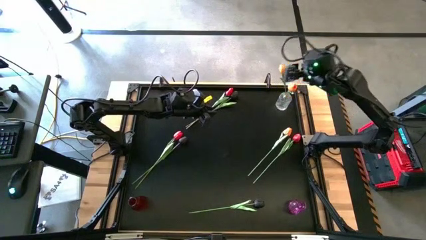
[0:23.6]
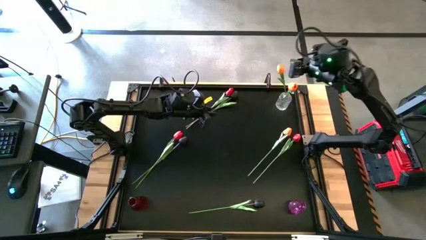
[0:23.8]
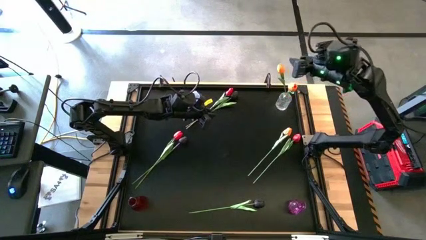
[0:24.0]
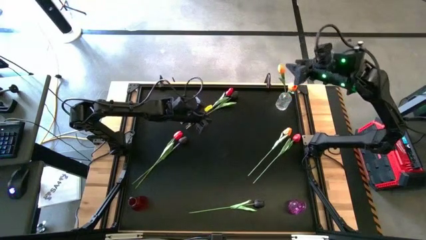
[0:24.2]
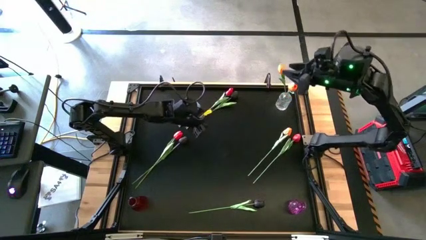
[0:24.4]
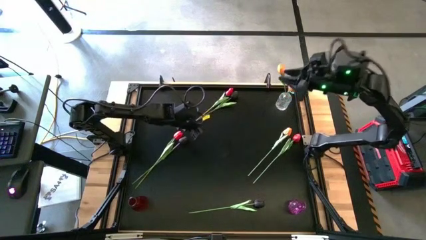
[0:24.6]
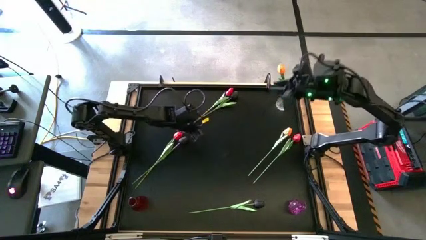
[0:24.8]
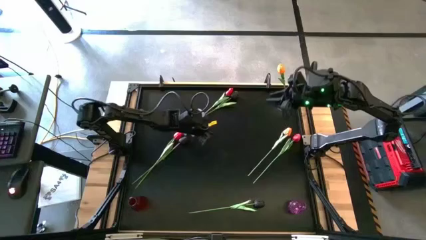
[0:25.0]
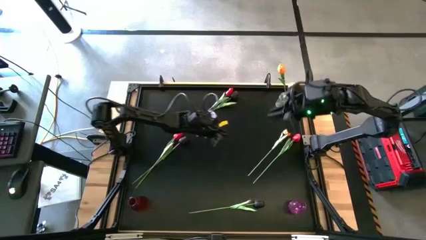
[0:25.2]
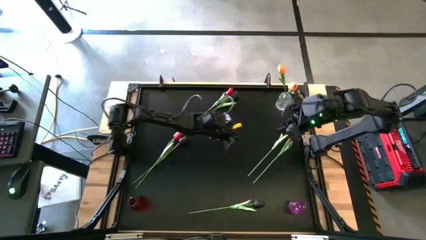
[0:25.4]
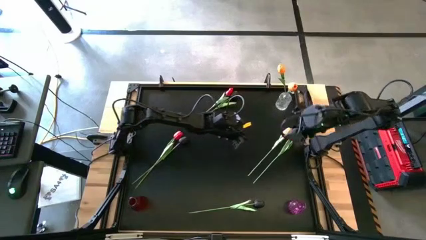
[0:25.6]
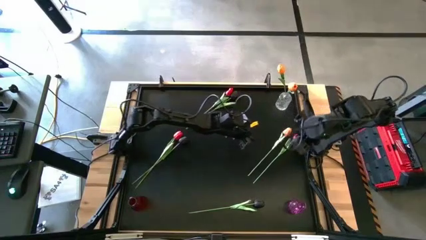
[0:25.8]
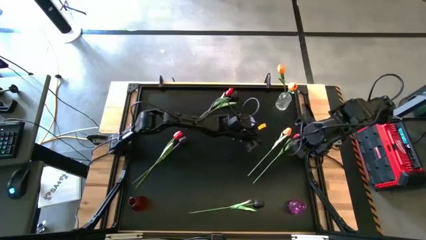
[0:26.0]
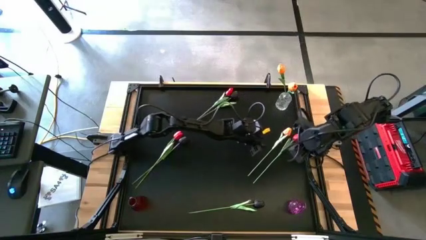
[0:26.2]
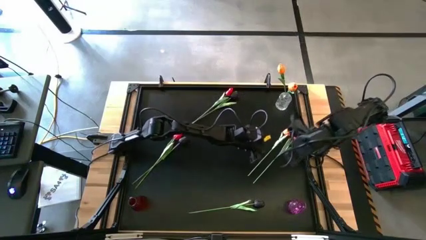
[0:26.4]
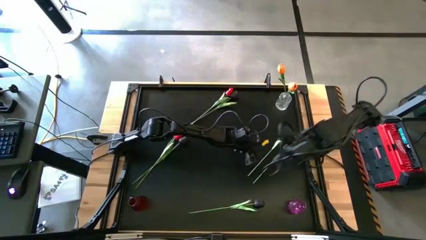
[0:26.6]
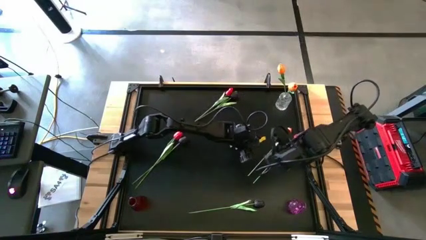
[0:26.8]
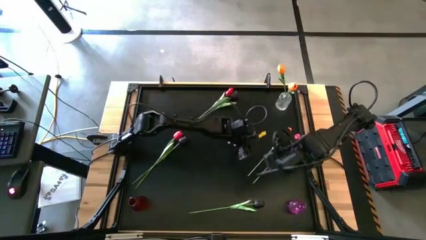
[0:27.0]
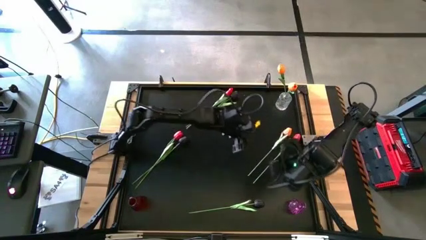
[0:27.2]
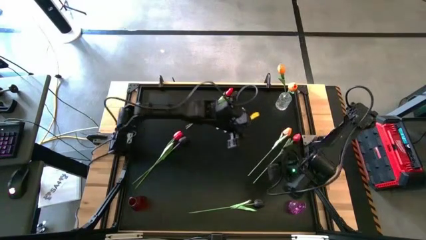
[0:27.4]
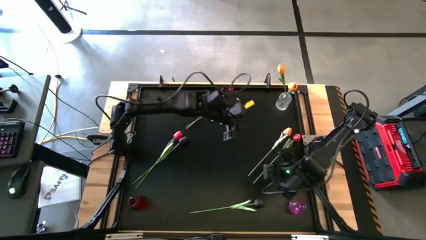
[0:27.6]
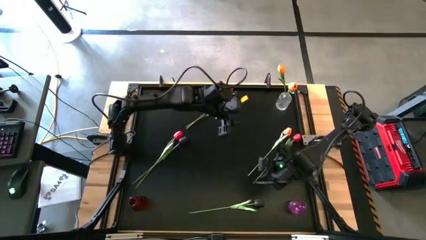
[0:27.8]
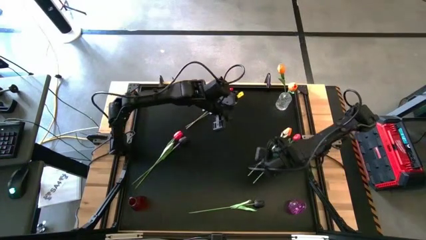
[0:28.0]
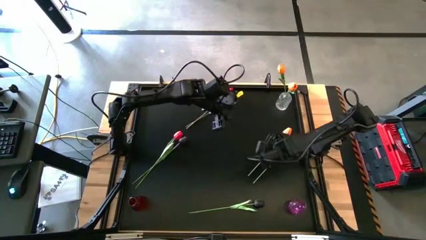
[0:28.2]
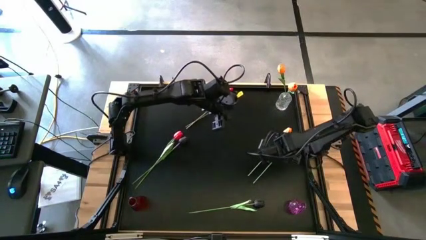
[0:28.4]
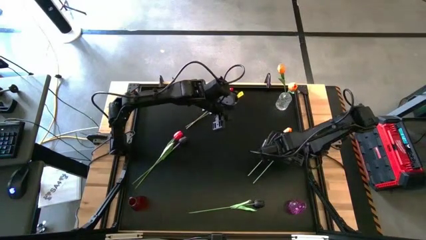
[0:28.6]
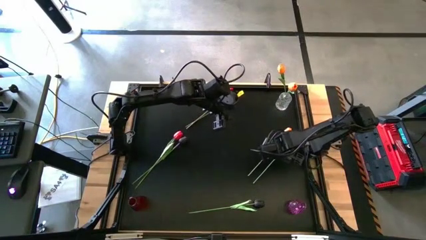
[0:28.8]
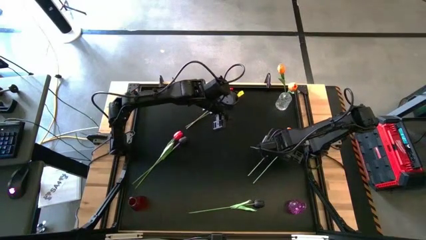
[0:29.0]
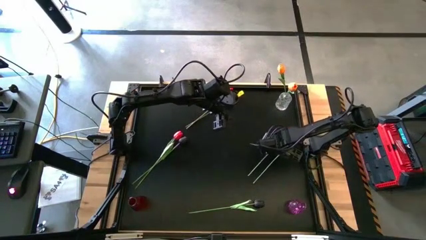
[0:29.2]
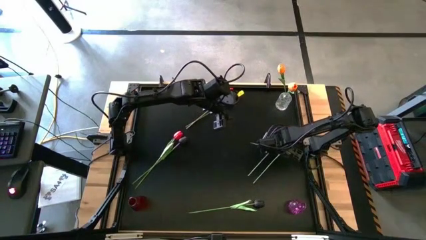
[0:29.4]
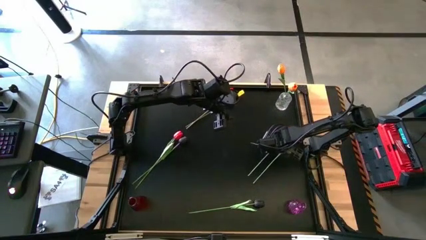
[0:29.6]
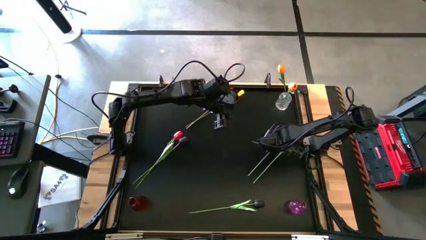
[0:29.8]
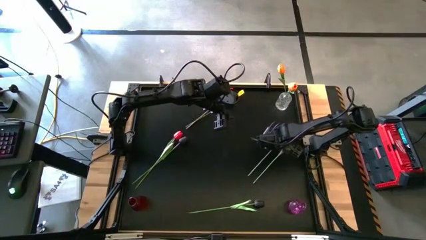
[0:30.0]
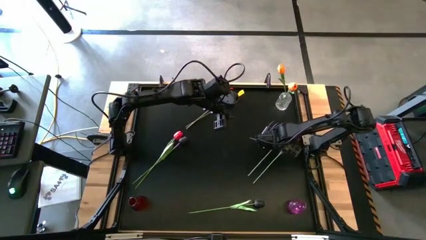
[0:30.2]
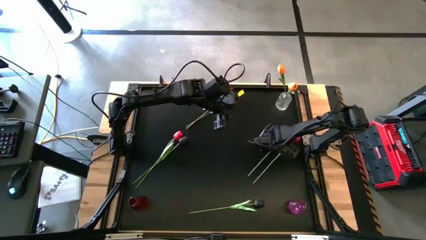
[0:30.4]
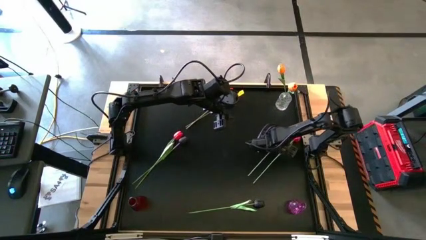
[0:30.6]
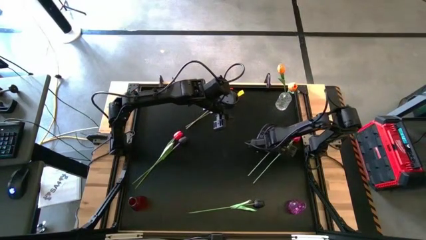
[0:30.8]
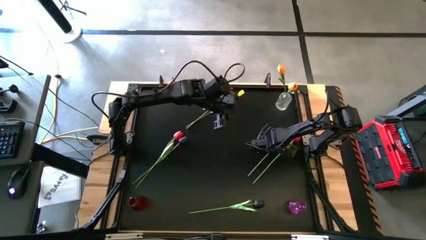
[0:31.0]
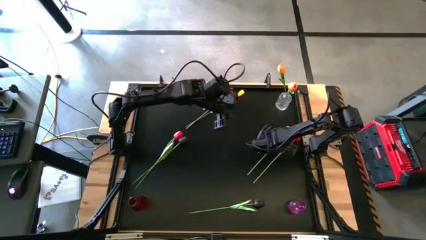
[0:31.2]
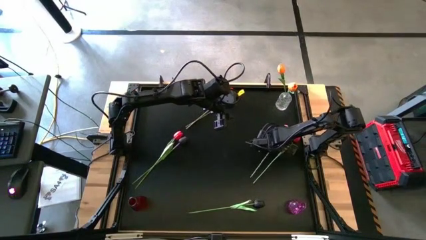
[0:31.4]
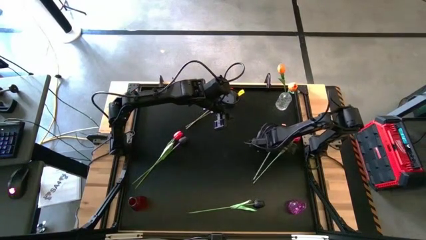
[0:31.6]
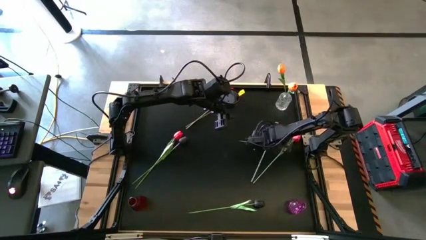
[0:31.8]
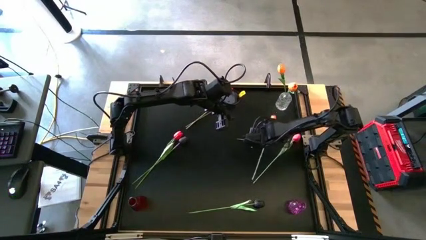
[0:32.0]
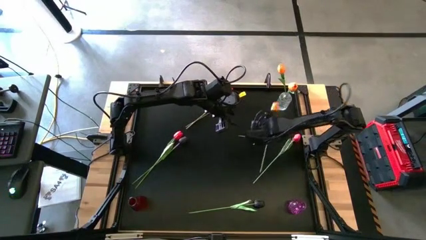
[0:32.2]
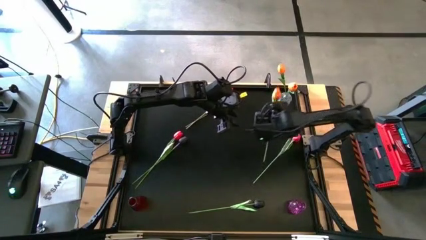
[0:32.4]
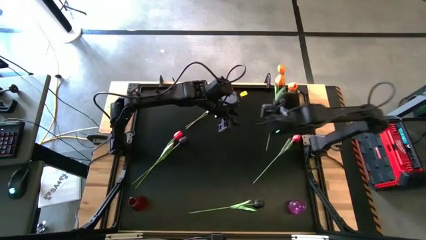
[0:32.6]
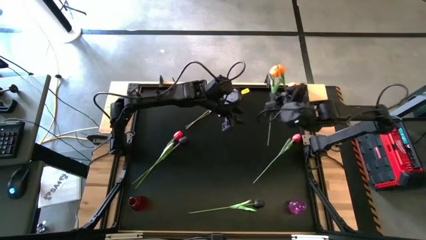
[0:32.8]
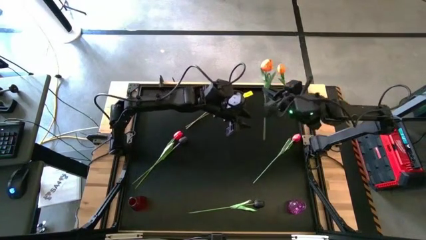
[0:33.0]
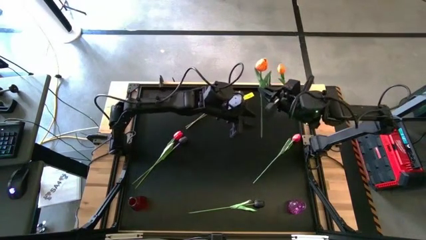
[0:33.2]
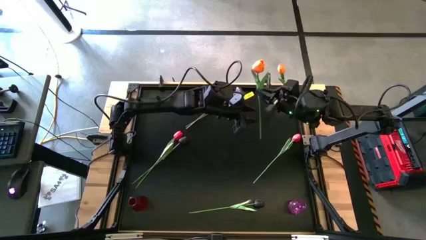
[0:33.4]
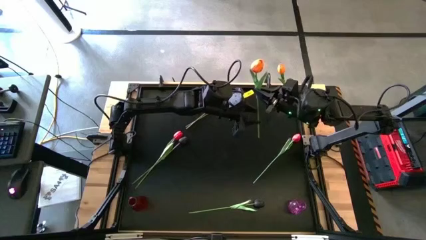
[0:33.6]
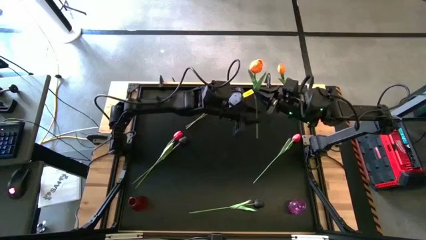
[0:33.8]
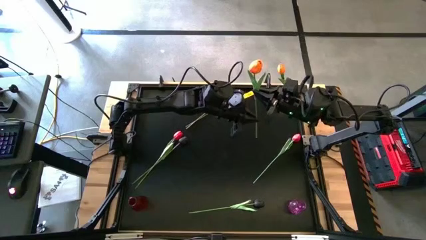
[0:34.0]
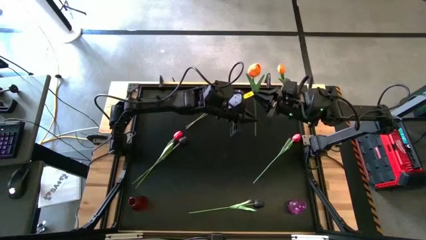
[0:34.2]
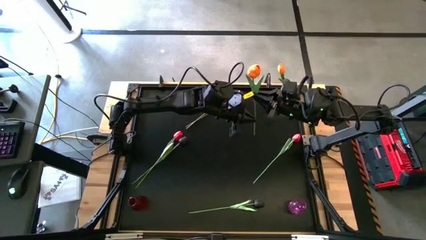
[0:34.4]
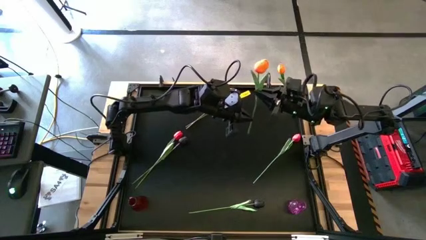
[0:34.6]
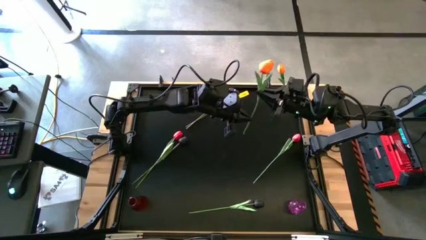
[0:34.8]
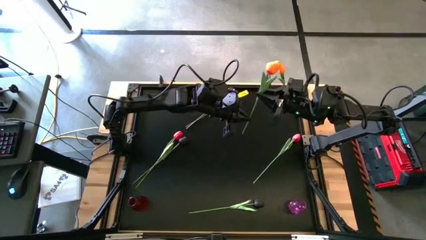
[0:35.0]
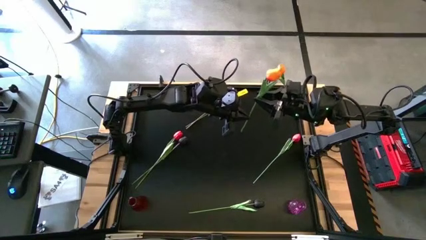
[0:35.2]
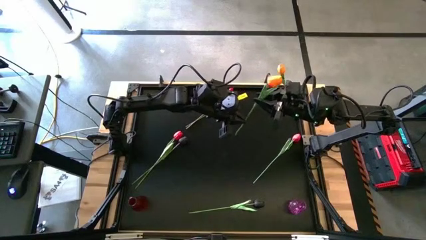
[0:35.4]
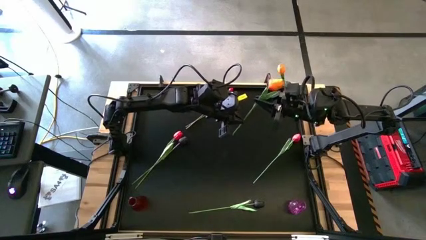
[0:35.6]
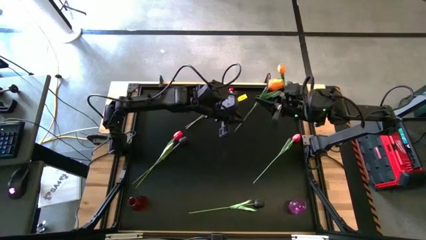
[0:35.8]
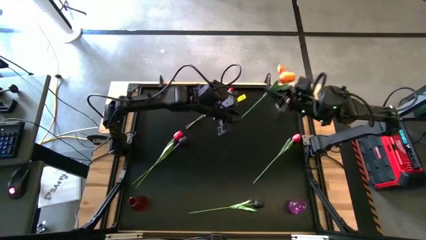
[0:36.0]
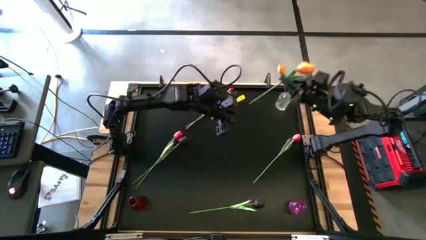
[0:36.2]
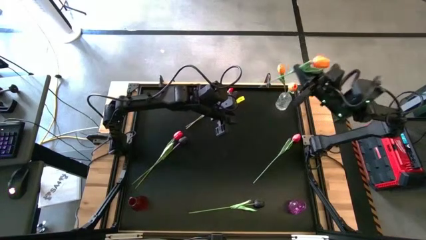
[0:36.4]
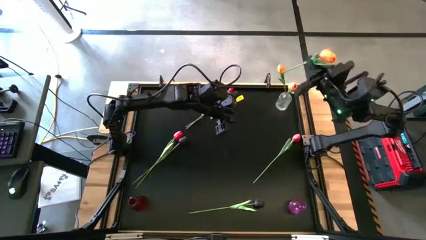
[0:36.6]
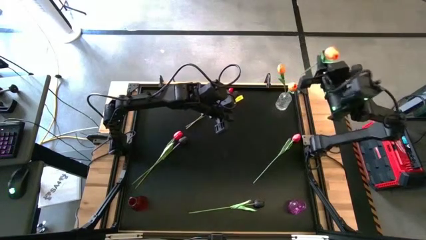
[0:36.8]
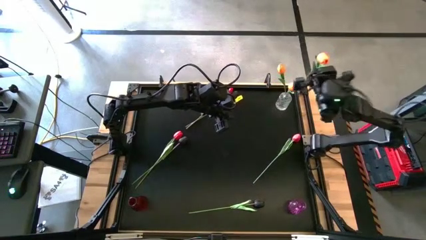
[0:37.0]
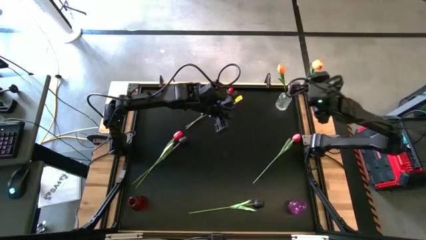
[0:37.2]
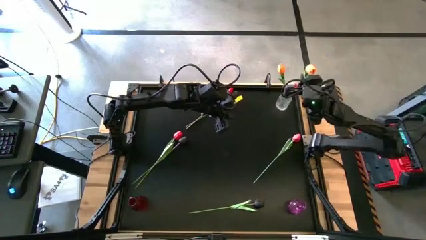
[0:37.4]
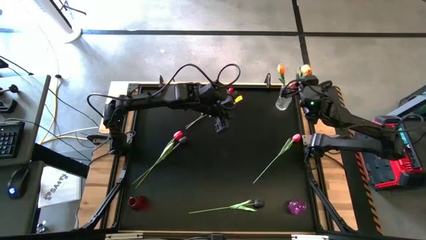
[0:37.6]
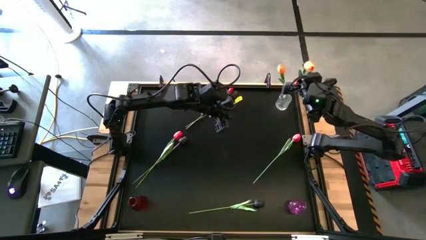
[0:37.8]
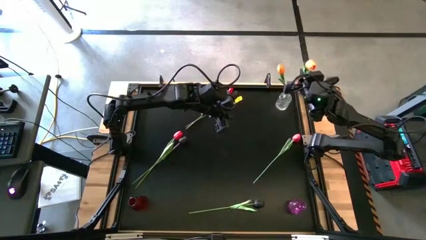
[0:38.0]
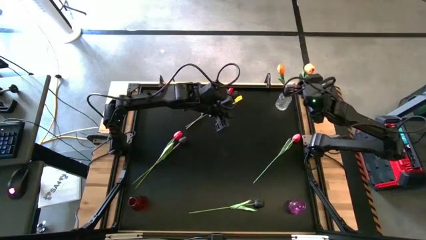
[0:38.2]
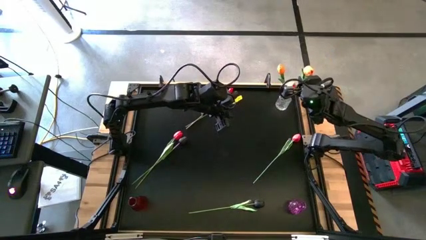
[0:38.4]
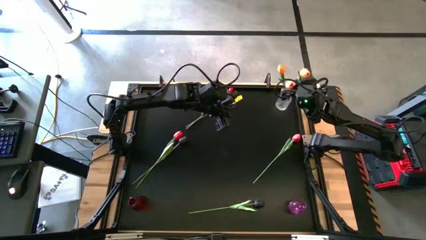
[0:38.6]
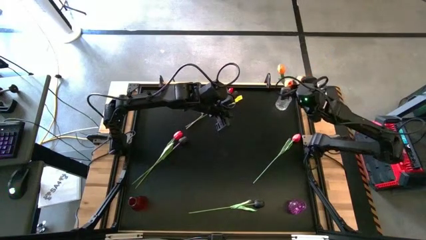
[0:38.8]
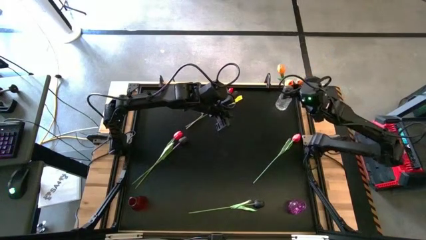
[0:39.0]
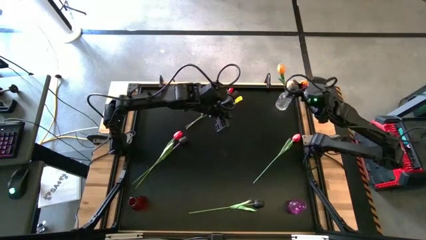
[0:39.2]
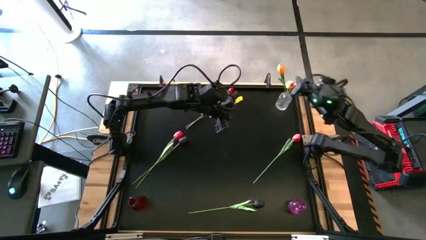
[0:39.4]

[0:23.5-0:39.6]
Task: Sort flowers into vase by color
Put the orange tulip into the transparent flower vase
